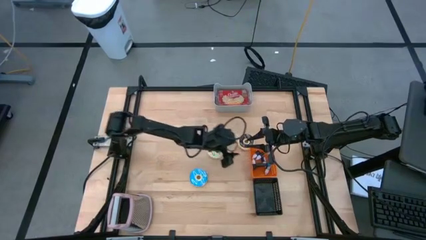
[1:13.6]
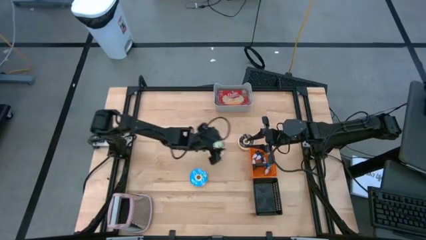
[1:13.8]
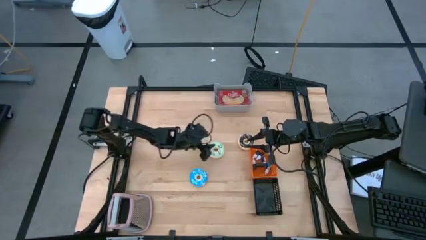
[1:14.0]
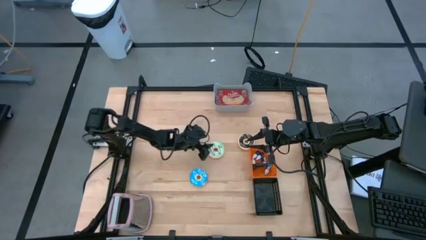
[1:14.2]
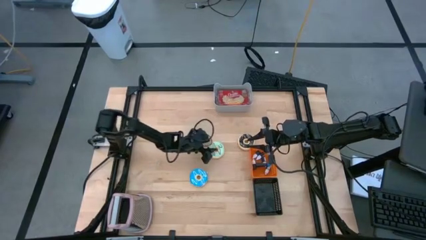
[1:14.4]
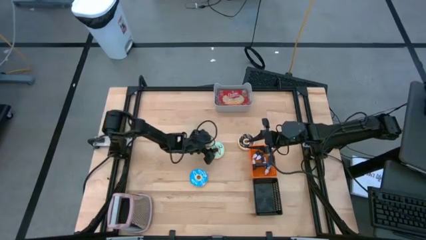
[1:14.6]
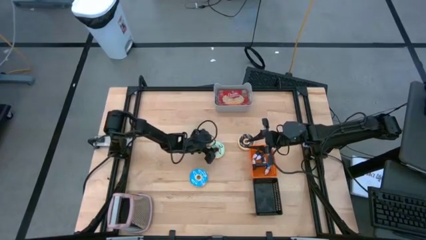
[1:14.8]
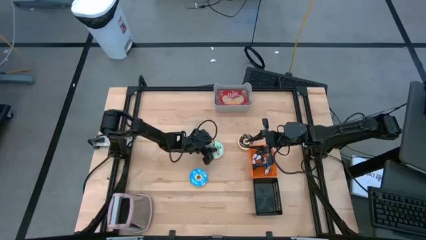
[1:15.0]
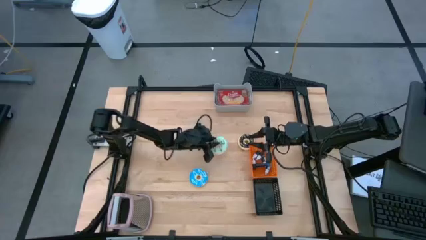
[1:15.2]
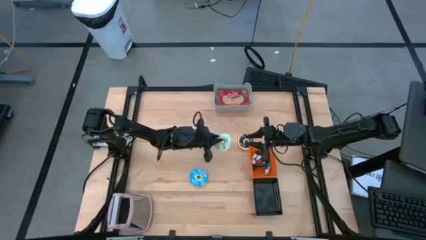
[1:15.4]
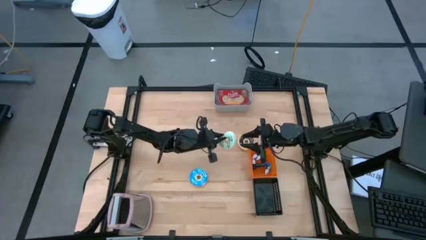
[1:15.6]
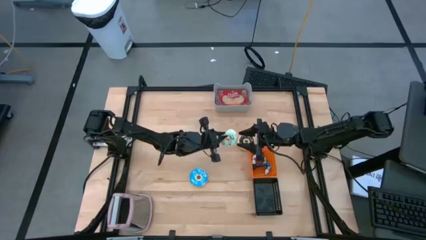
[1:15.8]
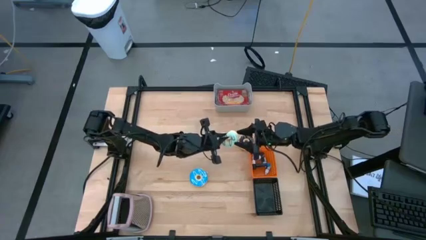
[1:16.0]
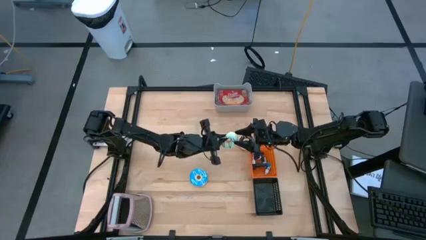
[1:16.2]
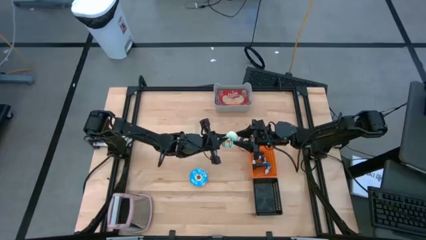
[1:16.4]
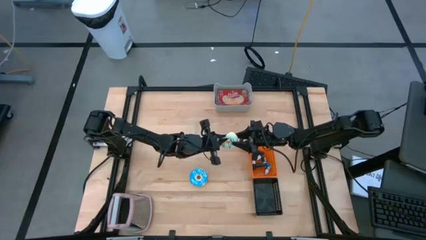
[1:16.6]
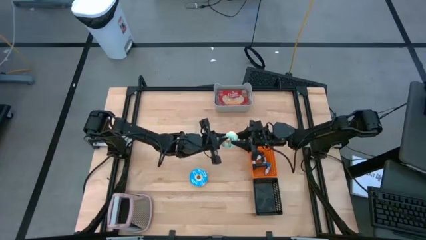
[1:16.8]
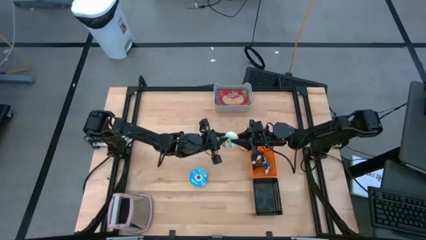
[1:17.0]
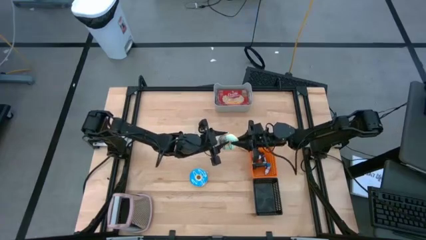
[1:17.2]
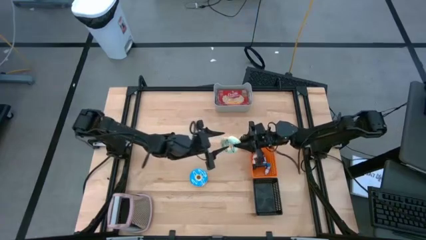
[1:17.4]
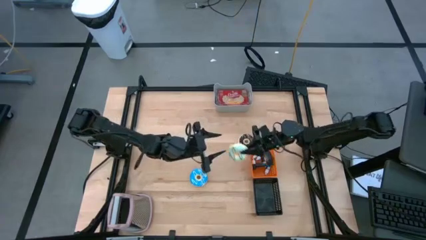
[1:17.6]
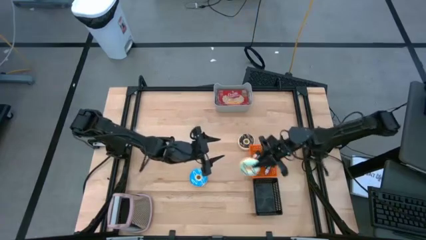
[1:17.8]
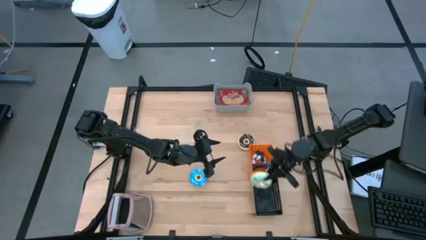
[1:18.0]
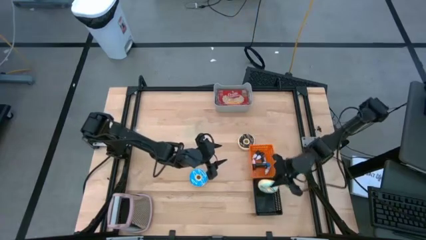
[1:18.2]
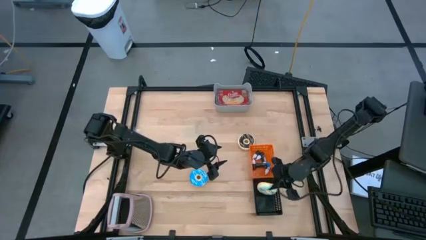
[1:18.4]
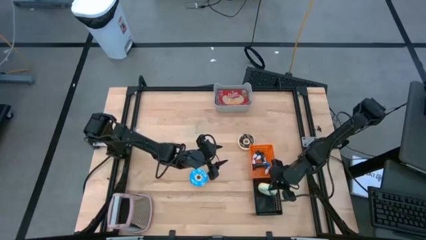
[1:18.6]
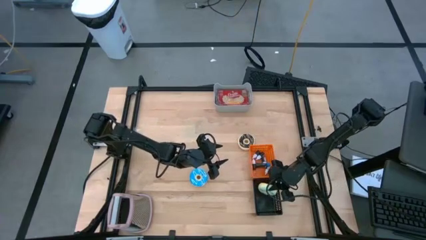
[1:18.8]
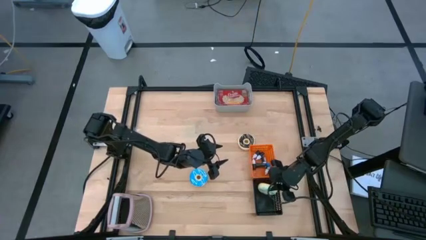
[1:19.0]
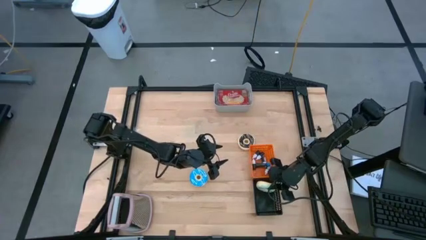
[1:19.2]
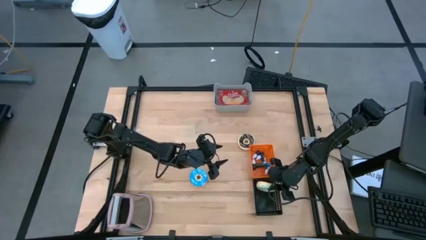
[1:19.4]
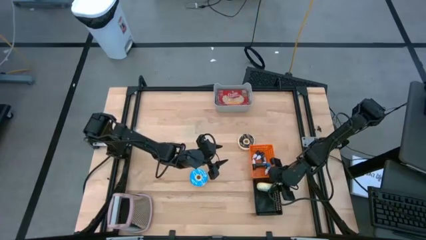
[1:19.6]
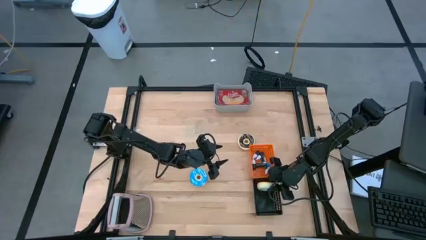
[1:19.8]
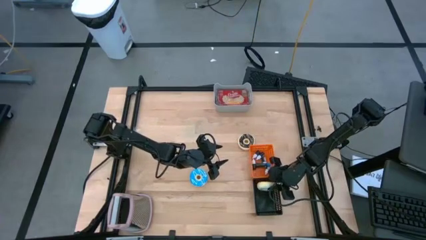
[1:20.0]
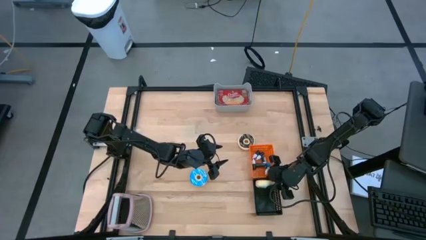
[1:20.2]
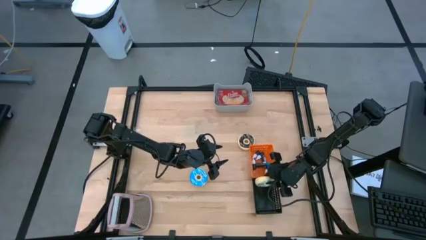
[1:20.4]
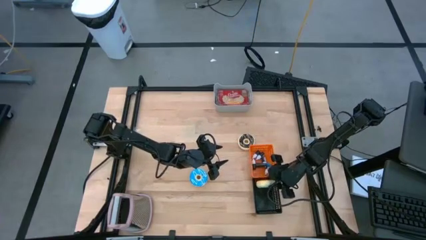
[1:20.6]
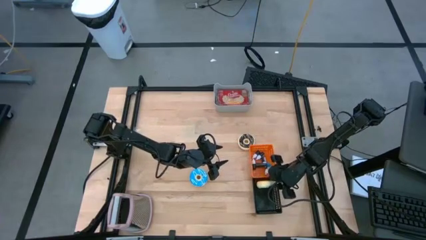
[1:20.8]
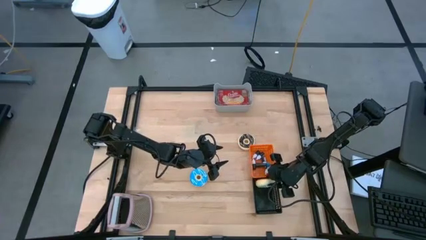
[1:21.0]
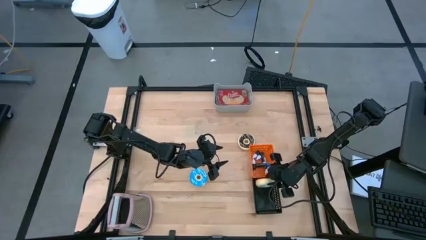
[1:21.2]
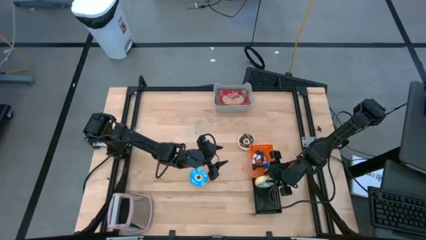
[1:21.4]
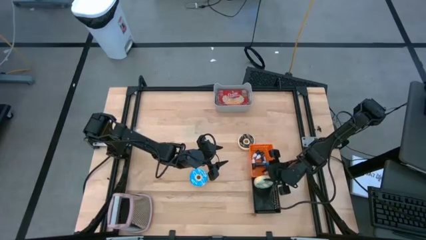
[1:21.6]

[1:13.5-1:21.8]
Put the light blue donut into the black bin
